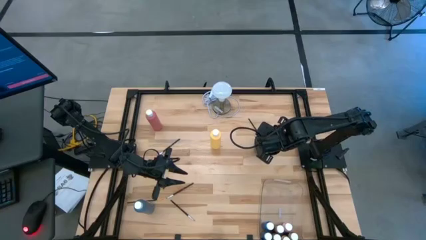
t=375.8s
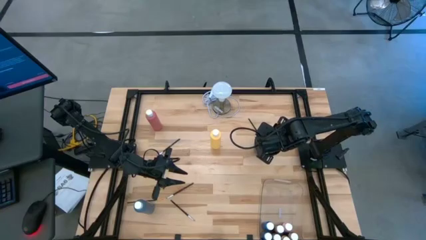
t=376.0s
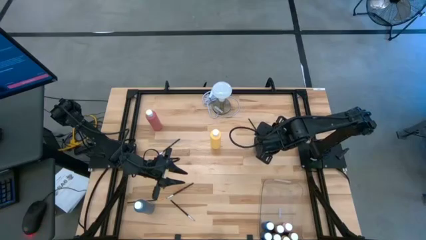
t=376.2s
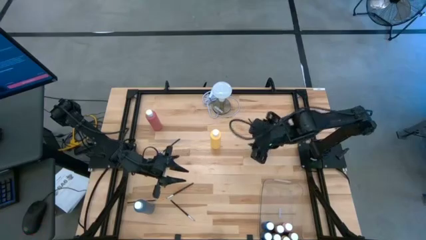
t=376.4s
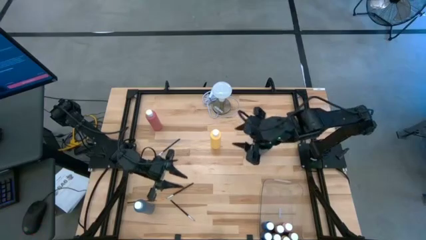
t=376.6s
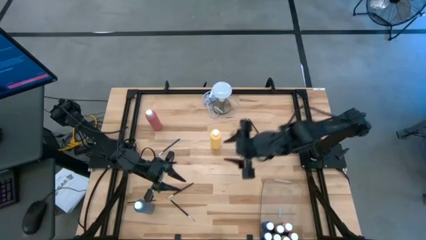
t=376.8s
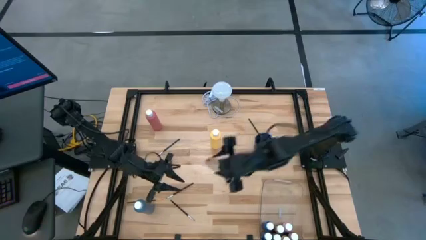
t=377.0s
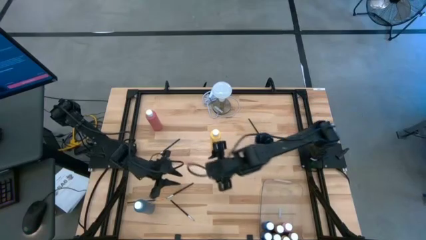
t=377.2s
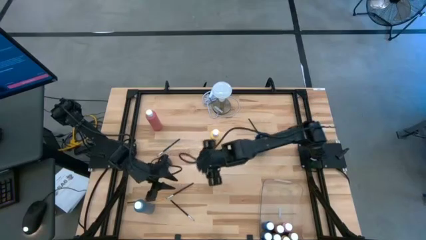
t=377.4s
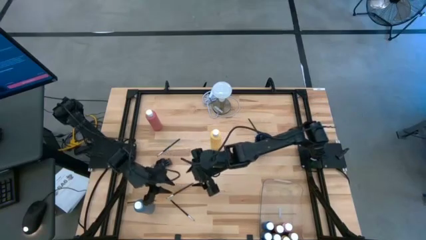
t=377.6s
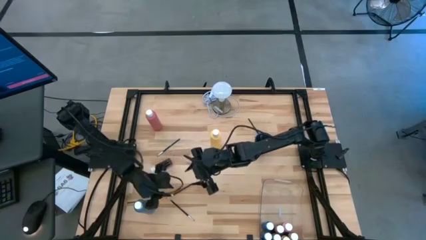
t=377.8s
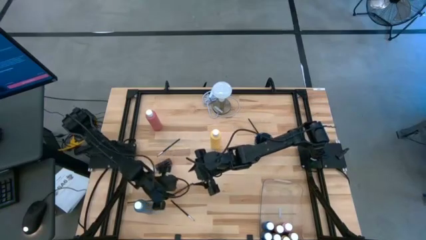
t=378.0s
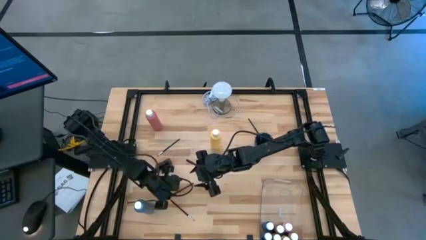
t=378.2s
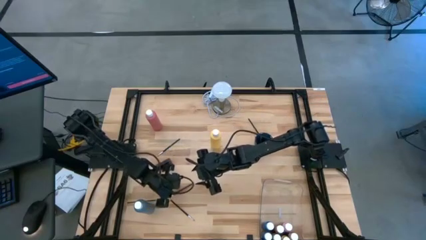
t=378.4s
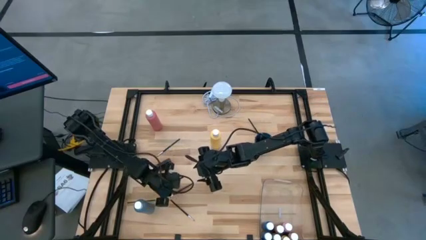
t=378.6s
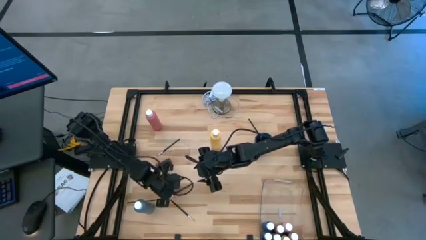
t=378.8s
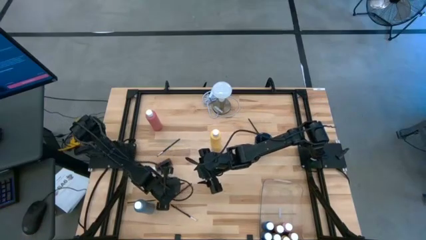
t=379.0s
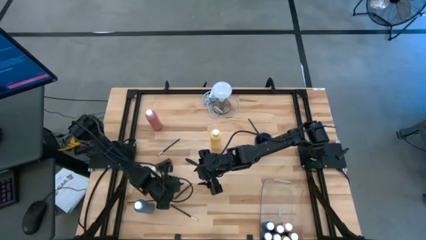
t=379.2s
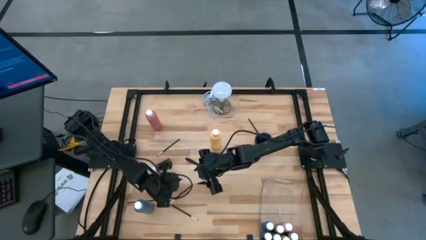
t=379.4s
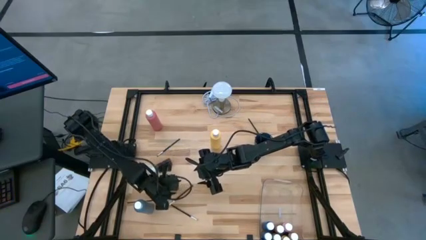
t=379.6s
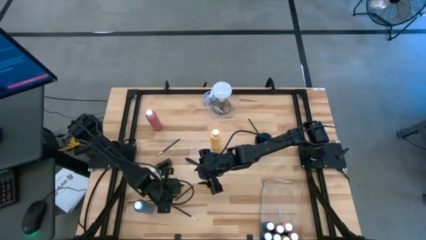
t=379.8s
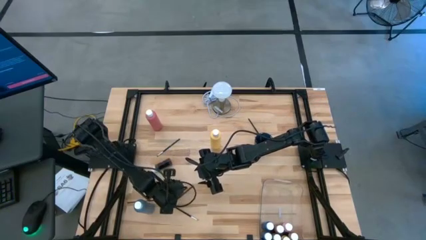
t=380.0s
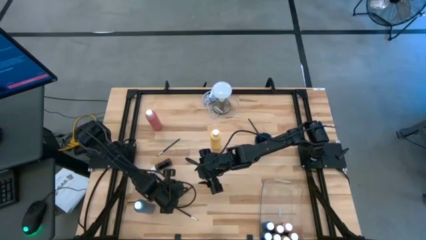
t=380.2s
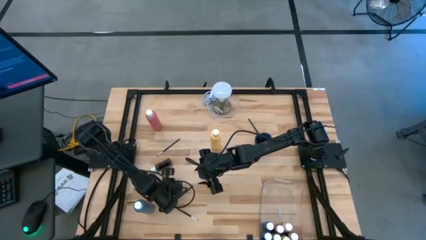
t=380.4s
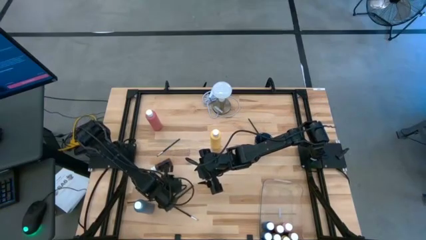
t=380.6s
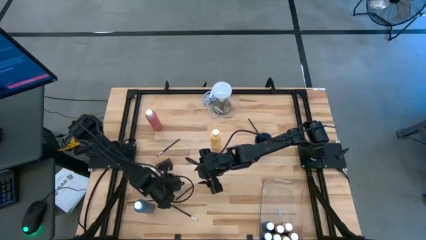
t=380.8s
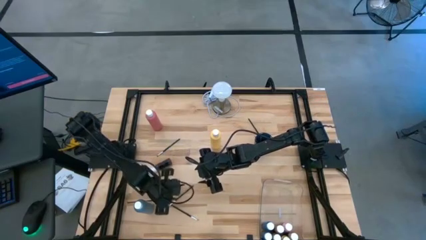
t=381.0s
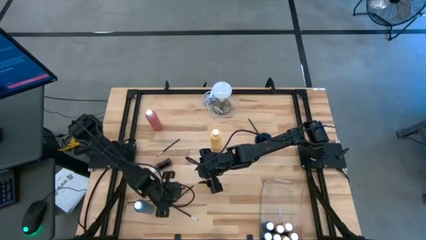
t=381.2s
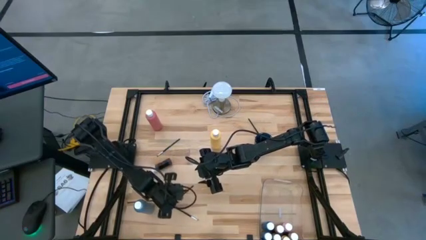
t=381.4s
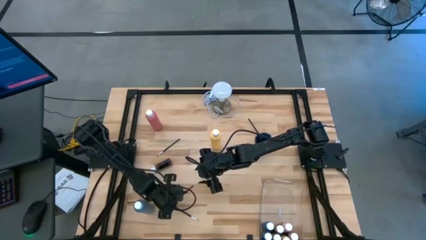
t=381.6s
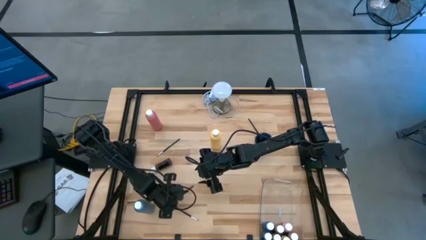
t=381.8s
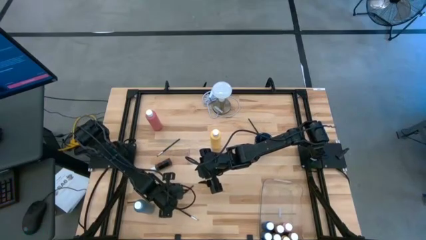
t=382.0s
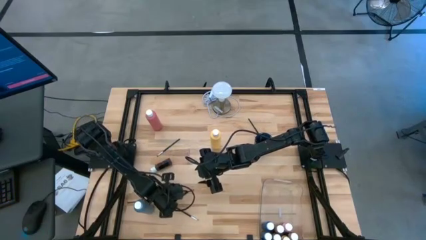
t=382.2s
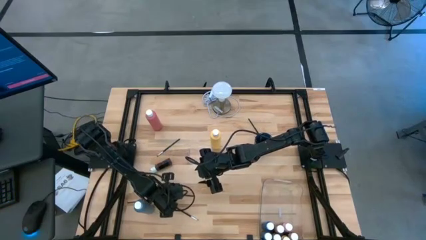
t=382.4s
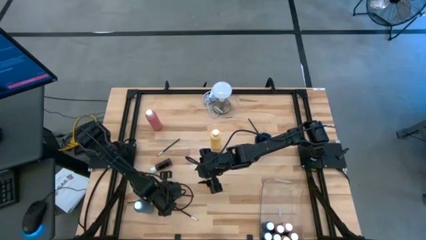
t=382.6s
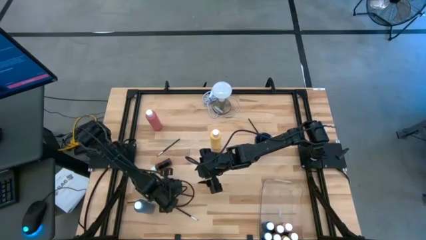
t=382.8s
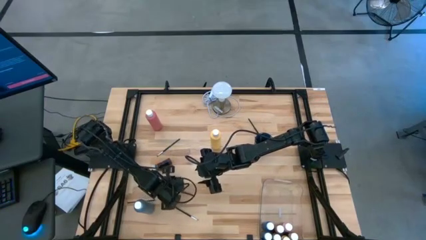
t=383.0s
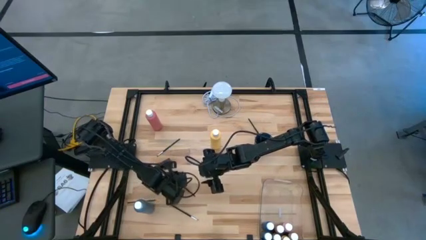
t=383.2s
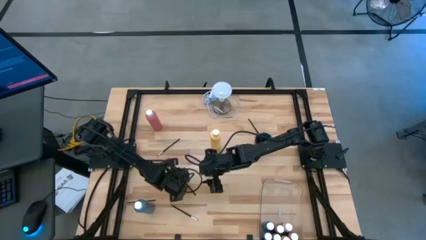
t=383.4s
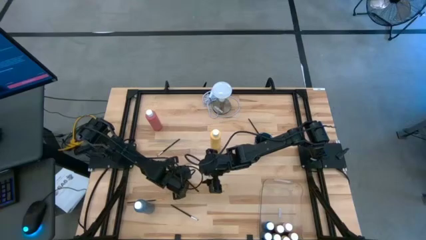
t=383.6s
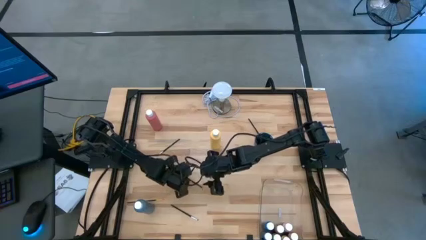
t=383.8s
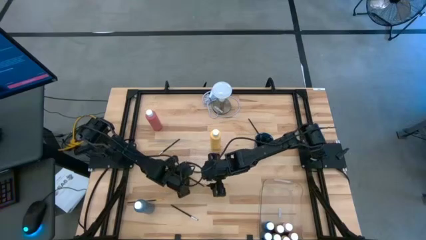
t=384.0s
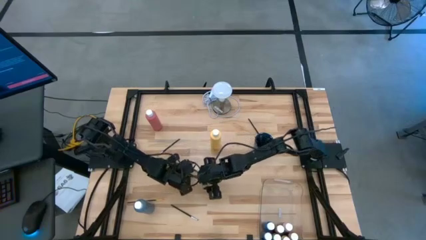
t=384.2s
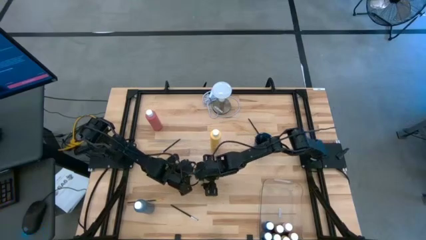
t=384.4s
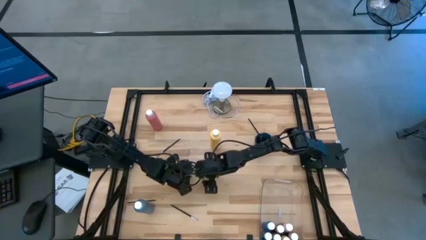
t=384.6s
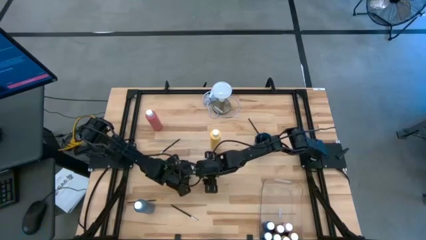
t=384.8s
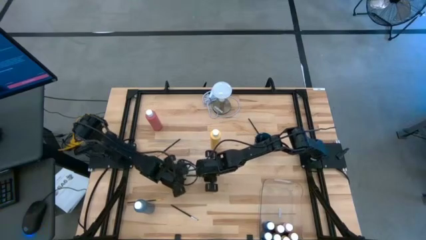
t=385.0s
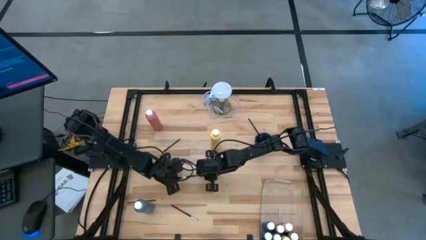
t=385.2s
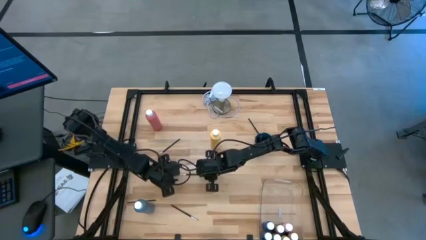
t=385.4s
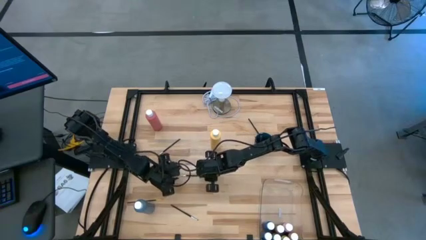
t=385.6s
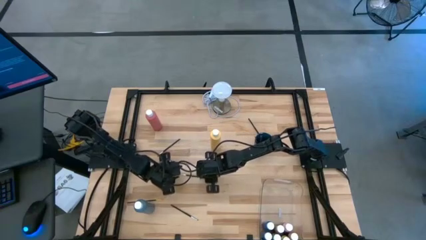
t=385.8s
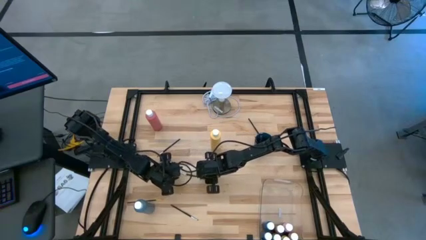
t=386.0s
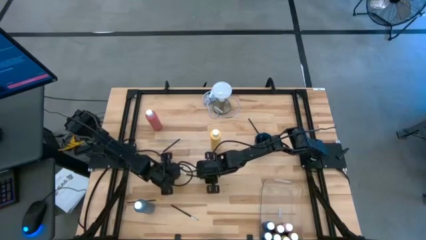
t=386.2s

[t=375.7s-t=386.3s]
Task: Pick & Place Paint Supplies
Put the black silver paintbrush into the blue cup

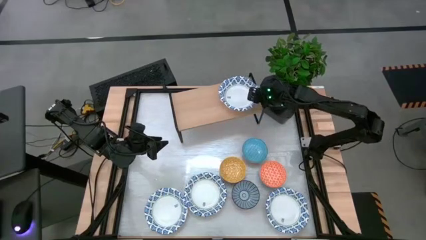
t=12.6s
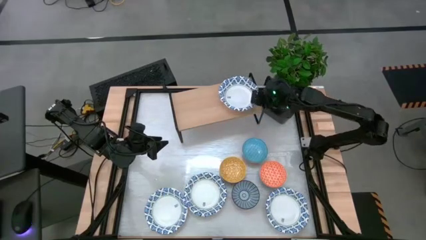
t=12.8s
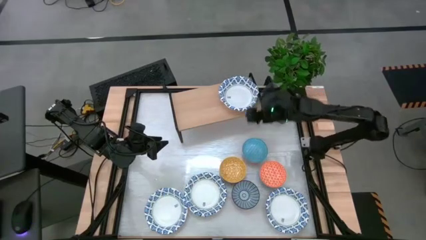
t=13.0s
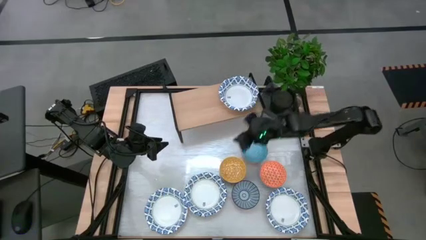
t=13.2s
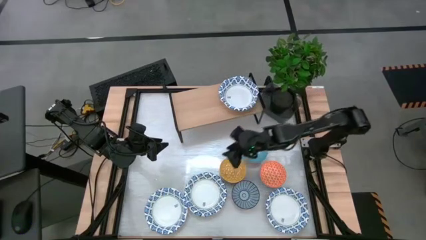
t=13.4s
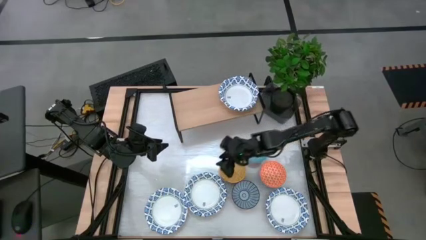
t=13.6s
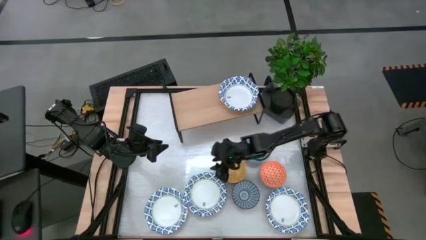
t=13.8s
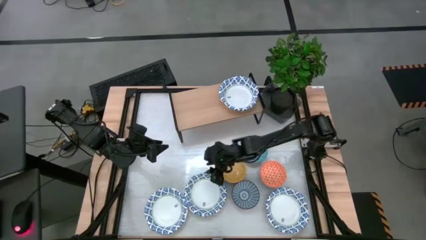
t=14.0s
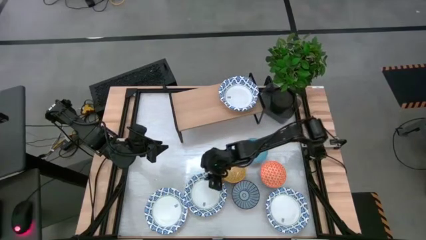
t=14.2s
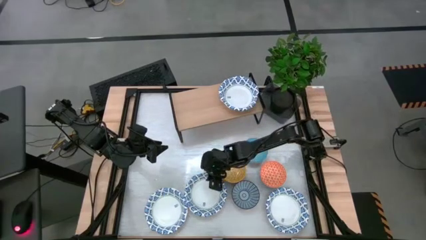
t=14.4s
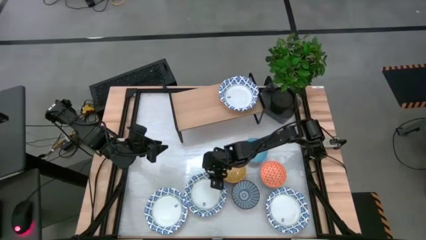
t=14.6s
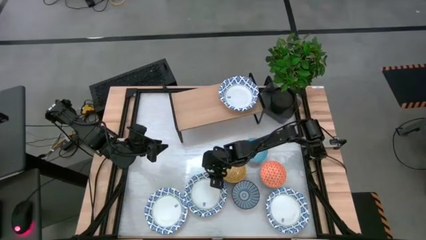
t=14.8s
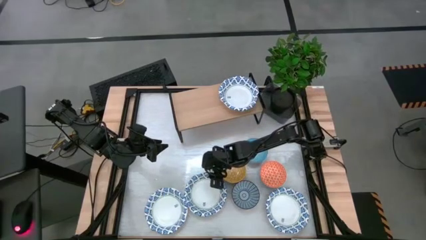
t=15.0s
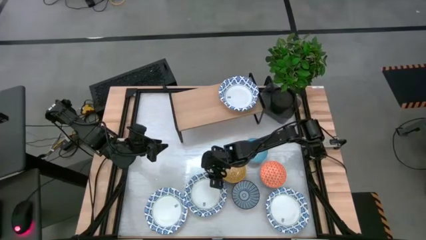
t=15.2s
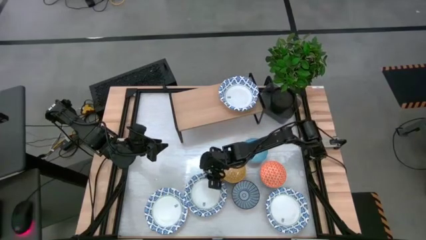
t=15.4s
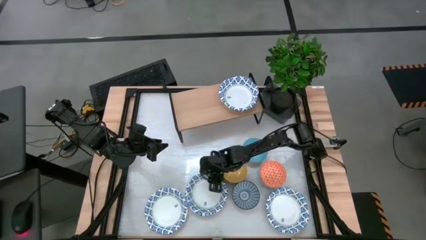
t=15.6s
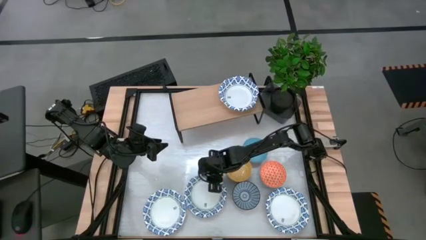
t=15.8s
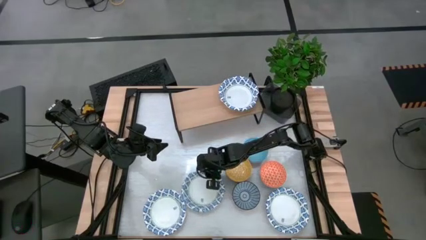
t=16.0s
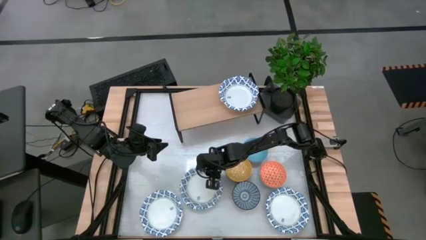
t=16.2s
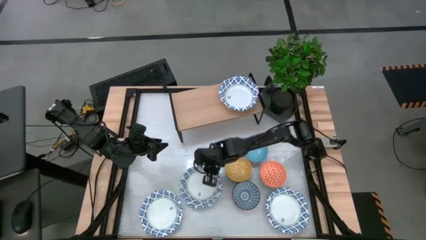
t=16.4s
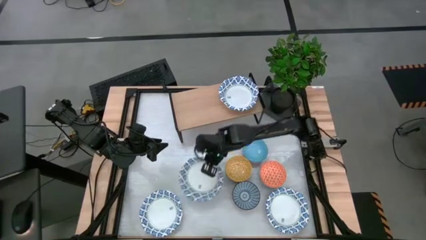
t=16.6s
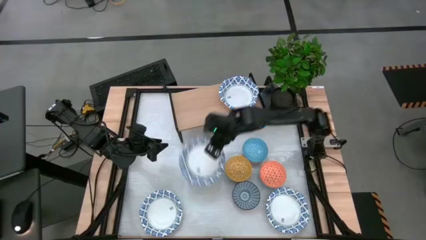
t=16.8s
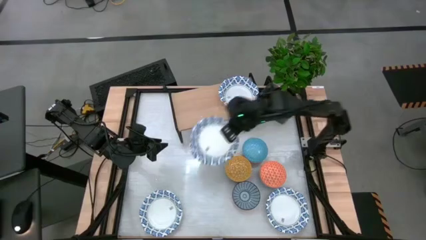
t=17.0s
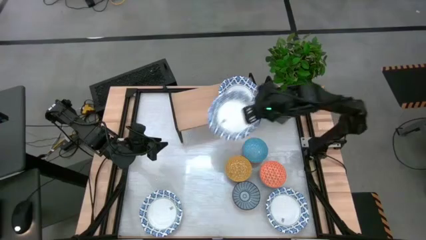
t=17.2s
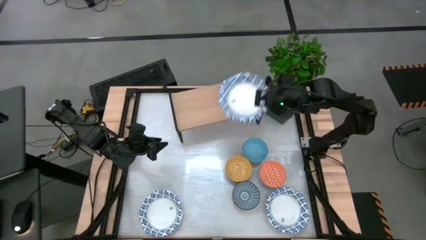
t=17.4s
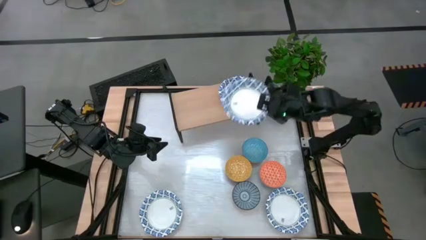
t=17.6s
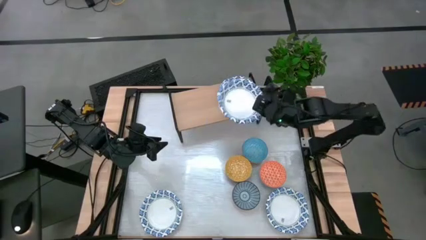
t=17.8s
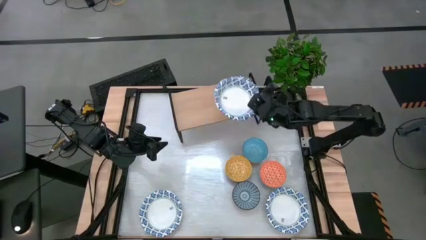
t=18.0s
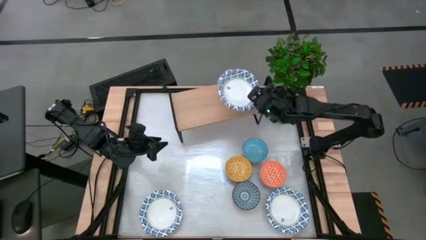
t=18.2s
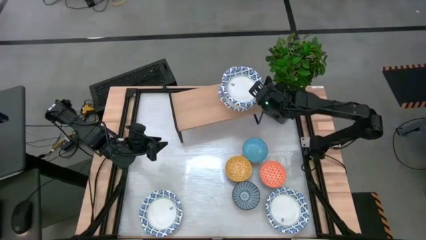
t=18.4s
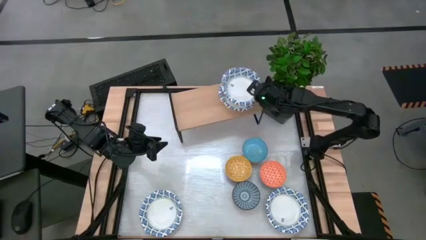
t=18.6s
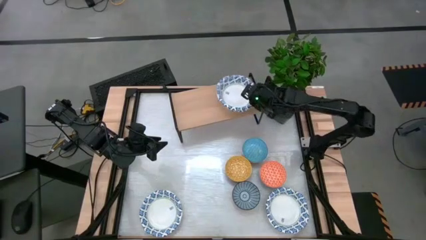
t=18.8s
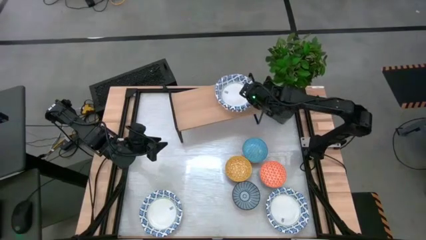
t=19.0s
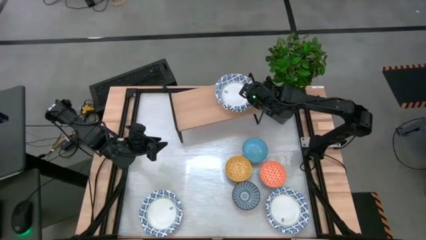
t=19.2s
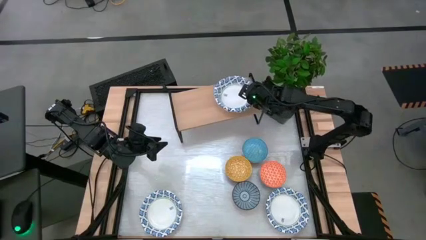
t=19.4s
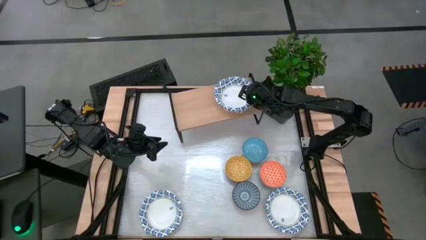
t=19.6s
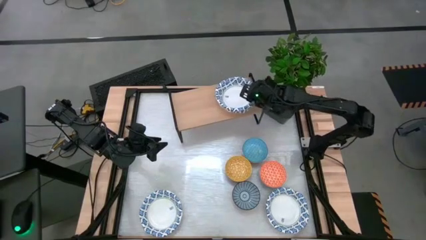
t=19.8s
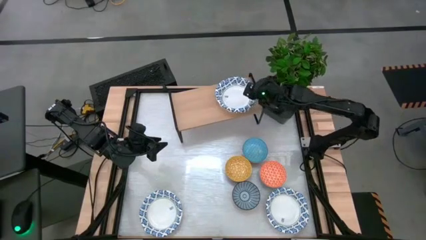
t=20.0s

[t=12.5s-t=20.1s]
Task: Place and stack bowls onto a shelf
Stack the white patterned bowl on top of the white patterned bowl on the shelf
